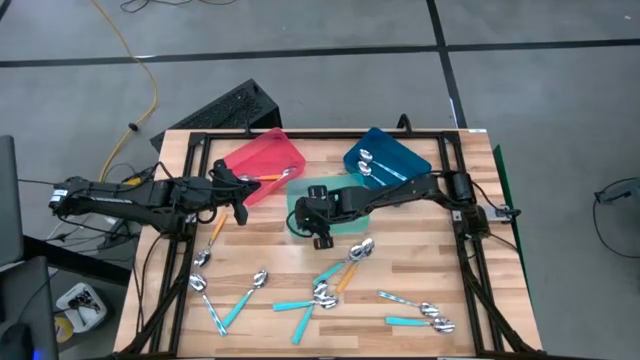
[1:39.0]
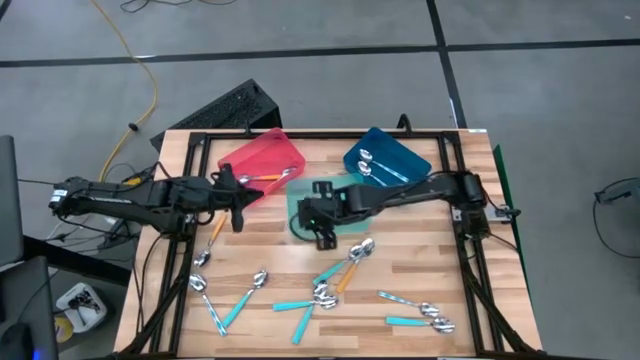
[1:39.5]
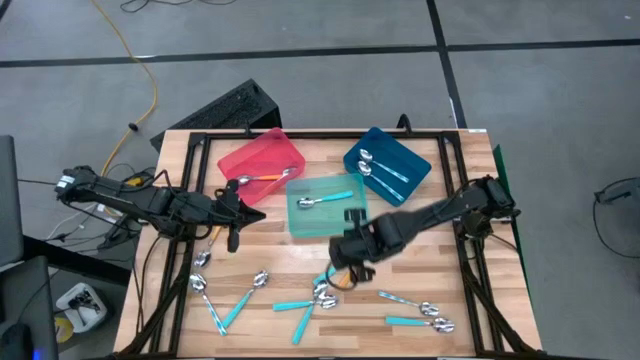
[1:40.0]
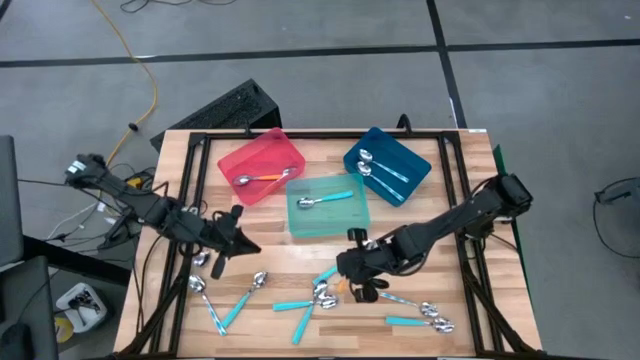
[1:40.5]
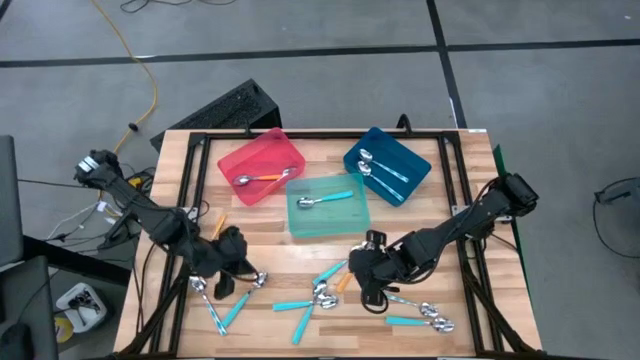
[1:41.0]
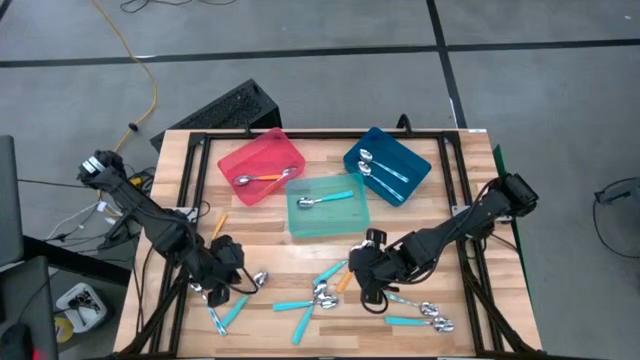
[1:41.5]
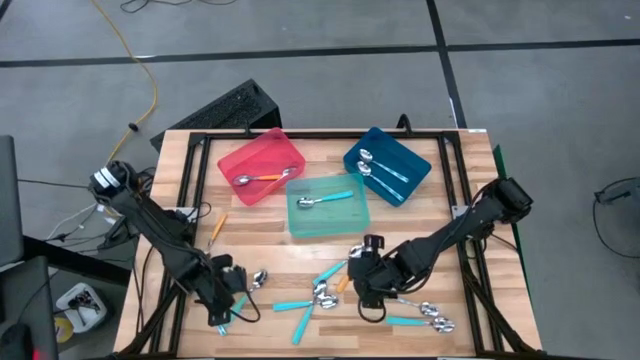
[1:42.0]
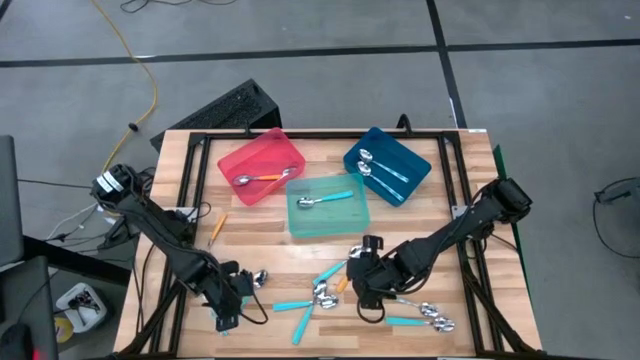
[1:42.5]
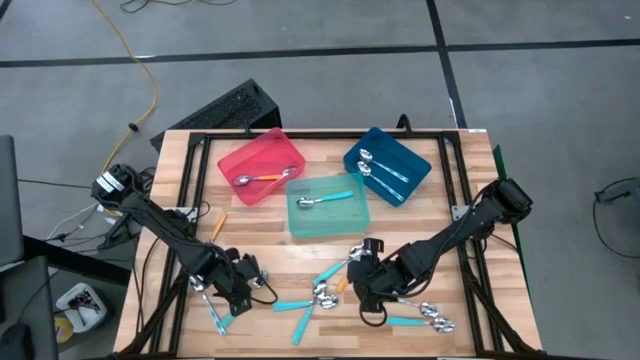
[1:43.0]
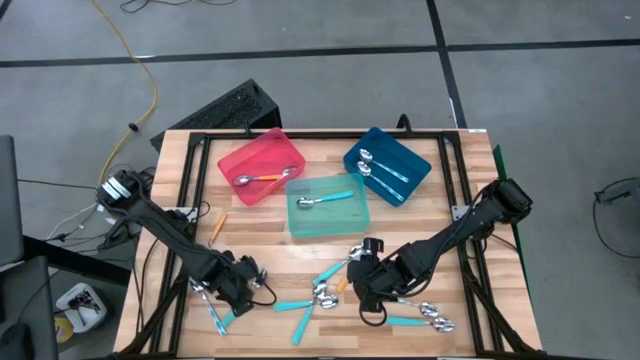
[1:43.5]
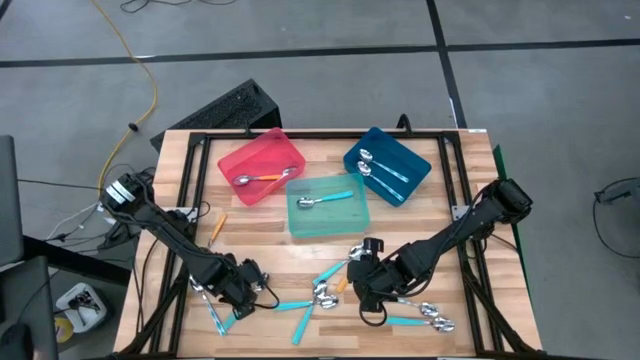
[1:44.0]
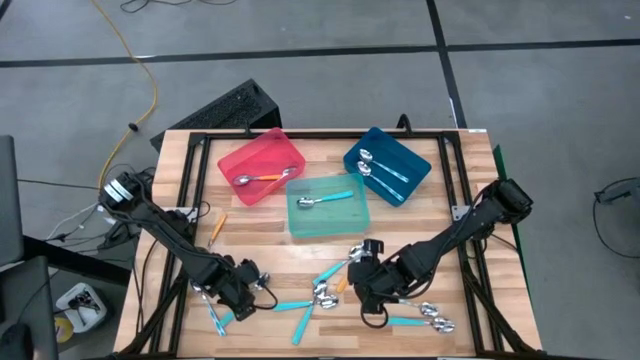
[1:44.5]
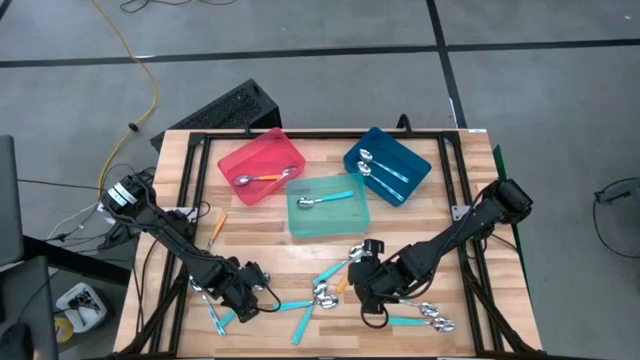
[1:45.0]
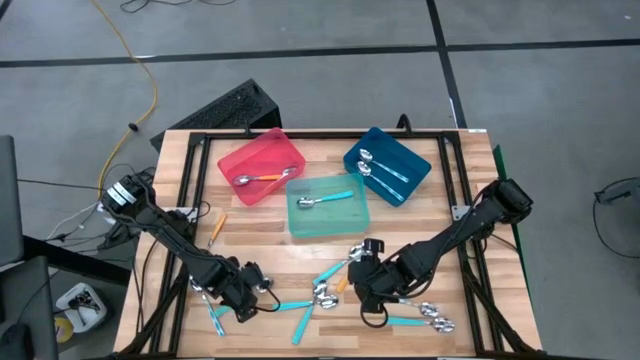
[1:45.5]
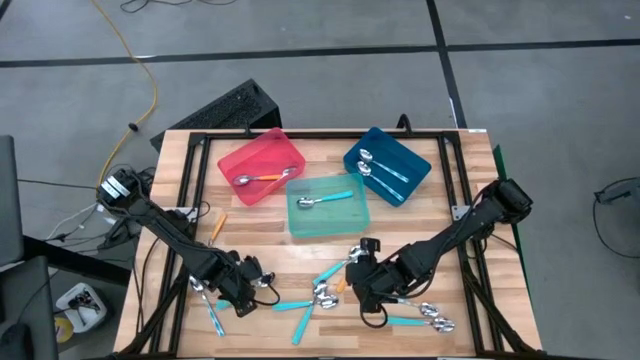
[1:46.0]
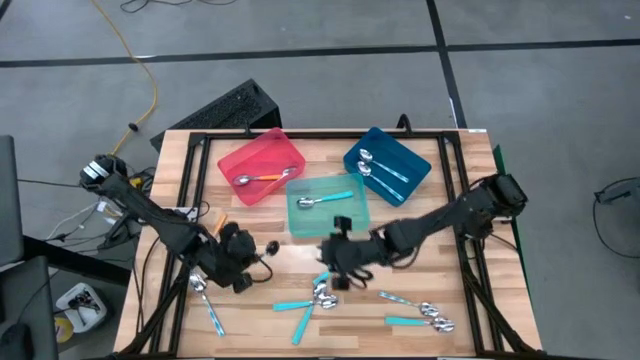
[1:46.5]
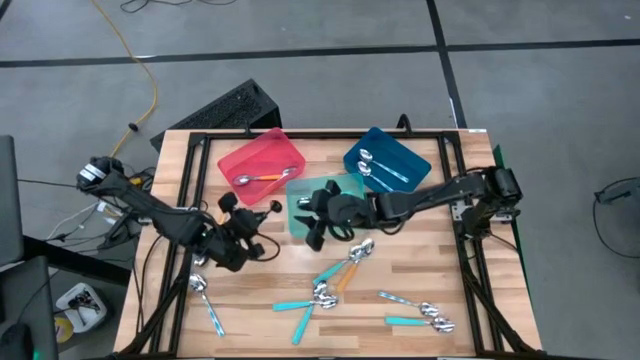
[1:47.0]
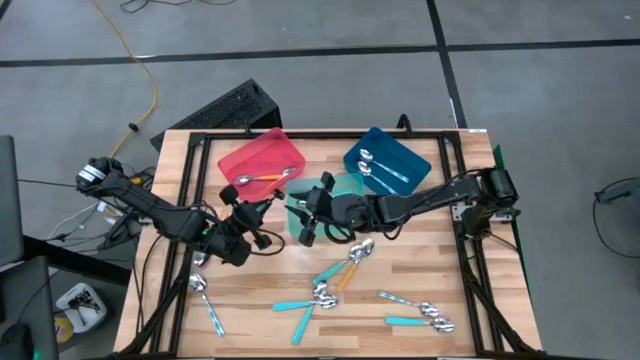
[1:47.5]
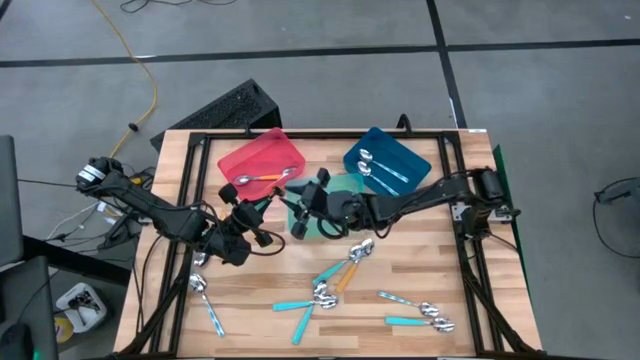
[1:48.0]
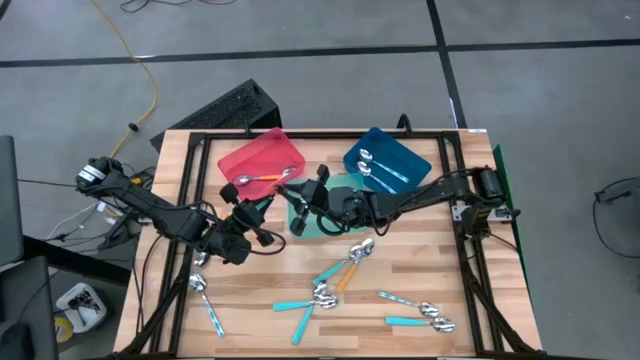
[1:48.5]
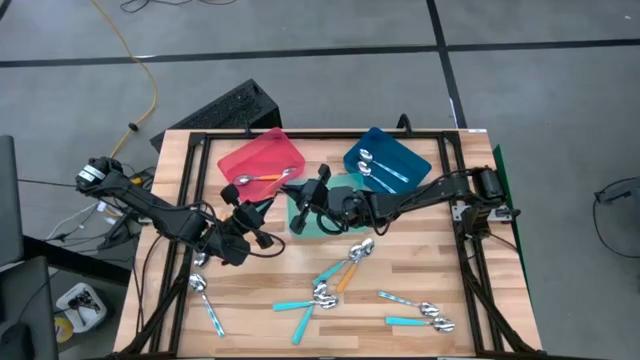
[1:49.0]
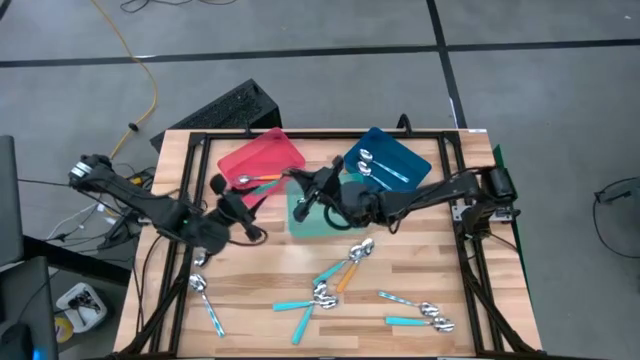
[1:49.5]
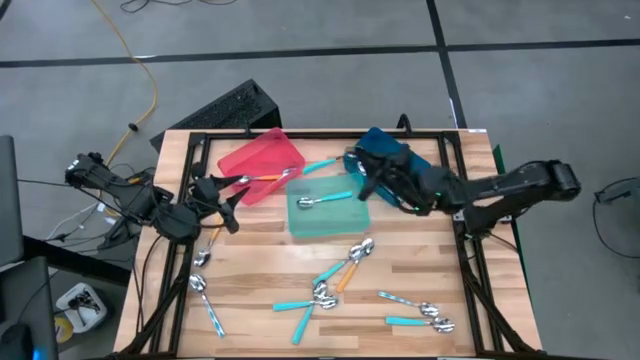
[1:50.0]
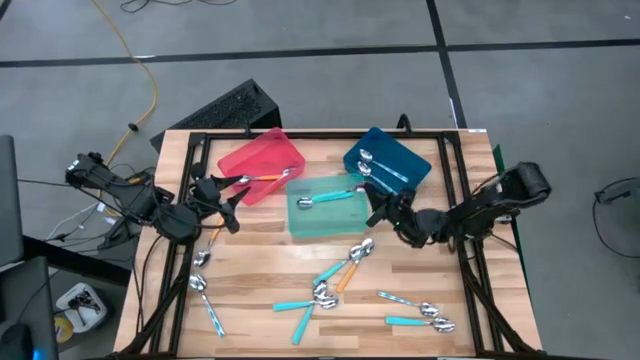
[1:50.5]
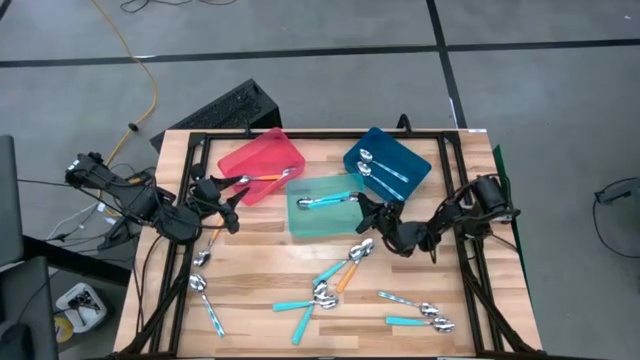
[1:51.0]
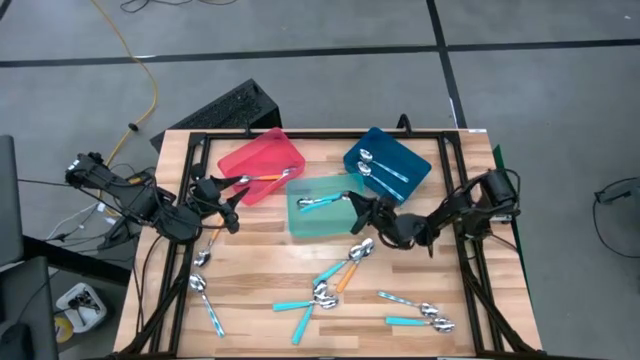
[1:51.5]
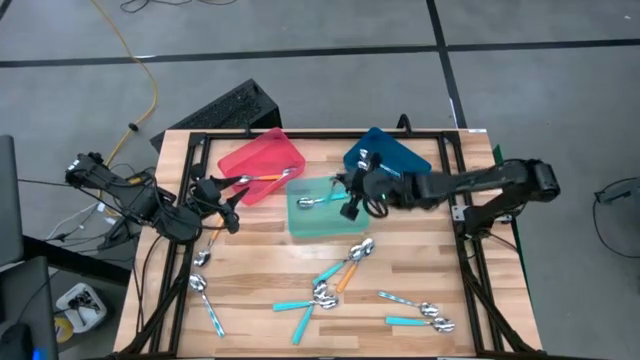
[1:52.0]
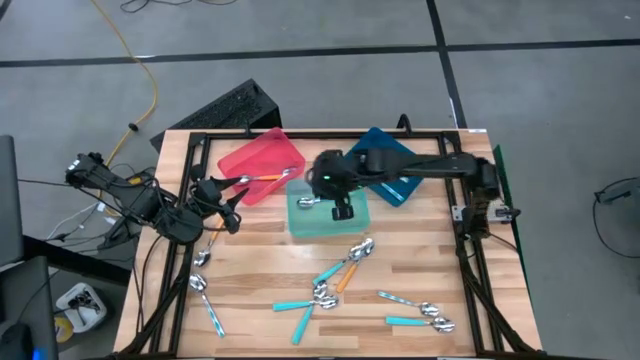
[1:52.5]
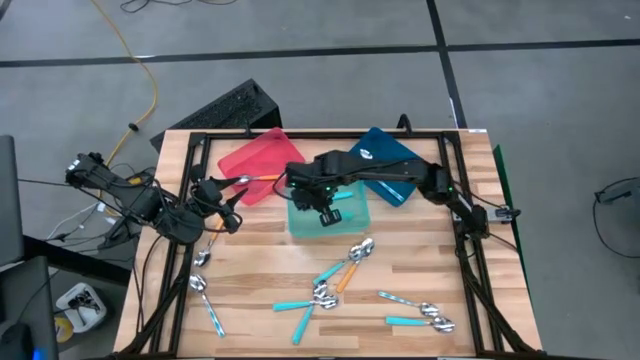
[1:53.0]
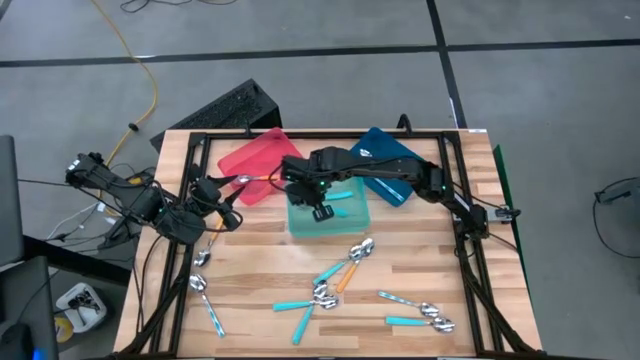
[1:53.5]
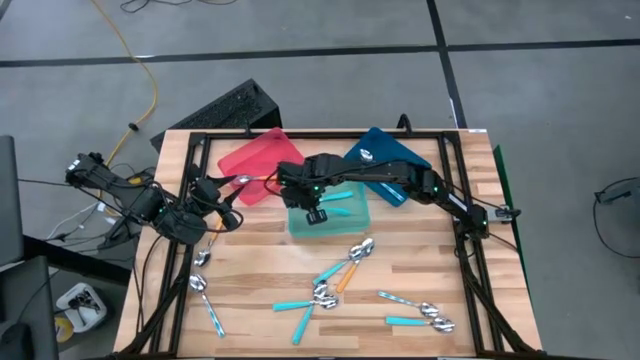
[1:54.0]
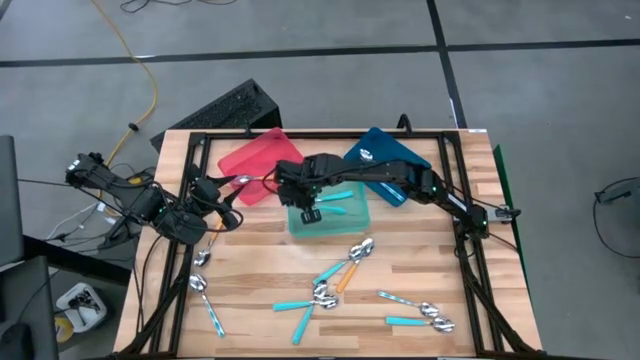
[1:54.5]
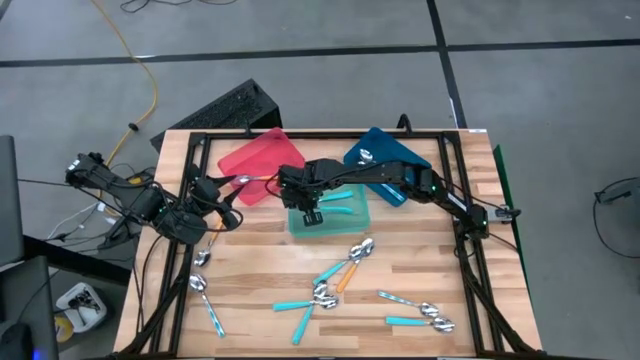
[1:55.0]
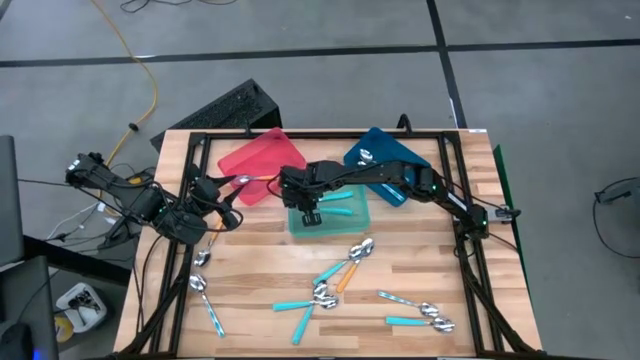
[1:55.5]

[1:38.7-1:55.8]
Task: Sort silverware by color (type)
Put the blue spoon into the green bin
